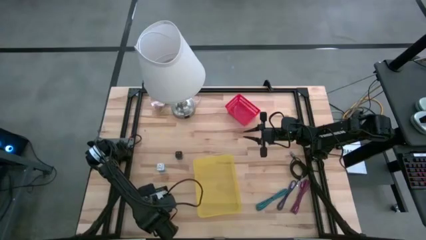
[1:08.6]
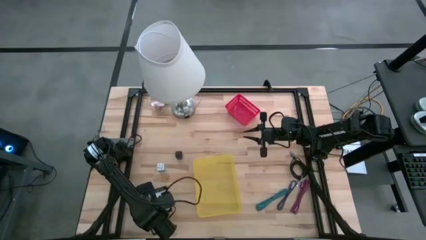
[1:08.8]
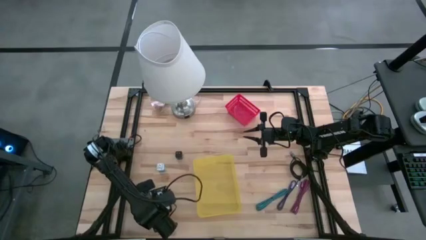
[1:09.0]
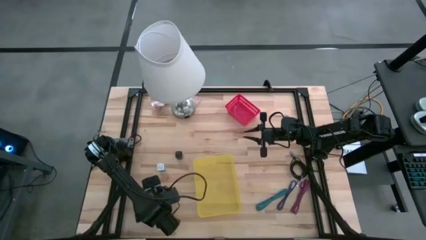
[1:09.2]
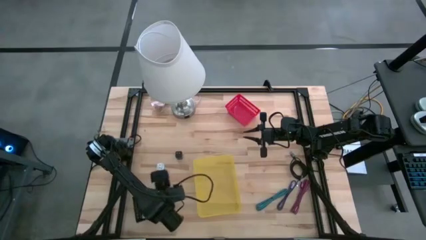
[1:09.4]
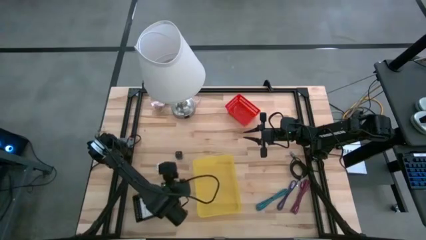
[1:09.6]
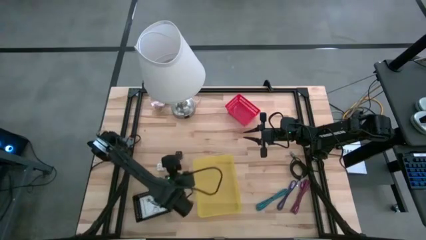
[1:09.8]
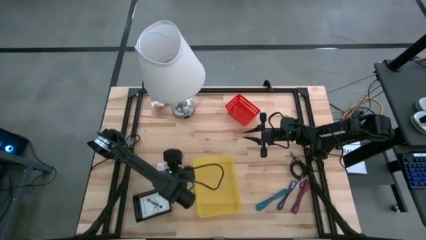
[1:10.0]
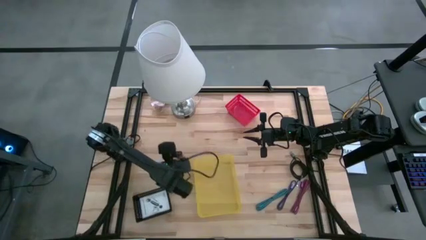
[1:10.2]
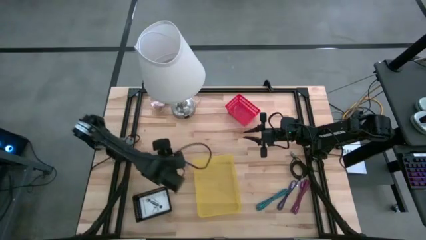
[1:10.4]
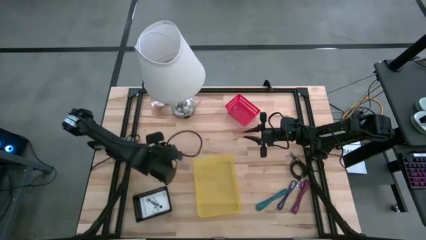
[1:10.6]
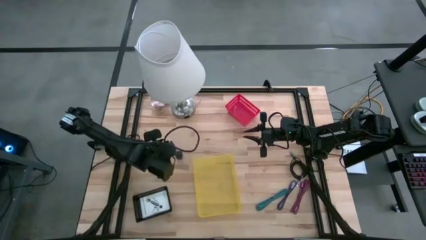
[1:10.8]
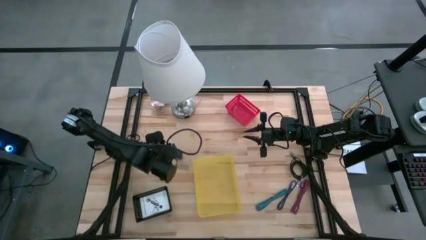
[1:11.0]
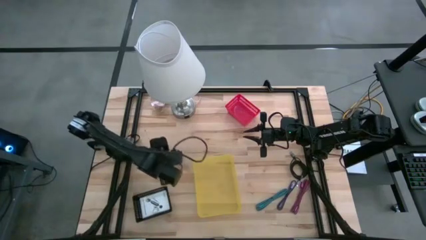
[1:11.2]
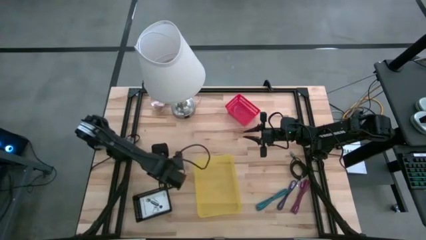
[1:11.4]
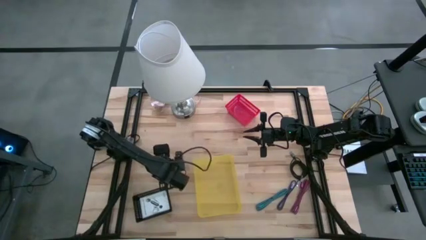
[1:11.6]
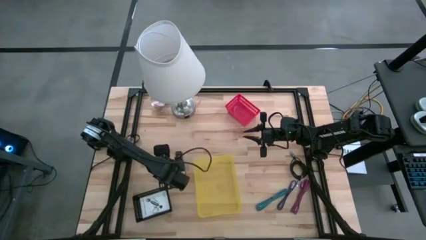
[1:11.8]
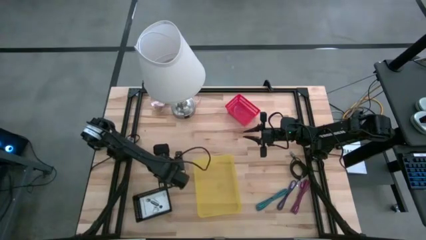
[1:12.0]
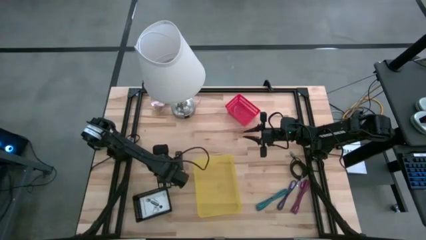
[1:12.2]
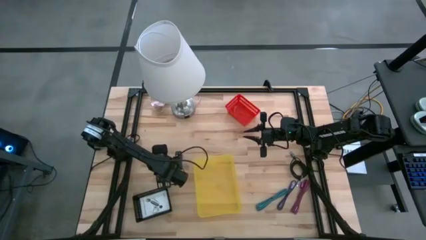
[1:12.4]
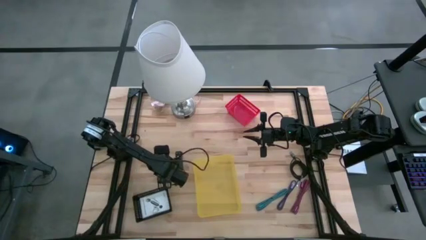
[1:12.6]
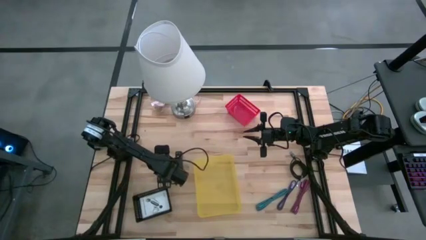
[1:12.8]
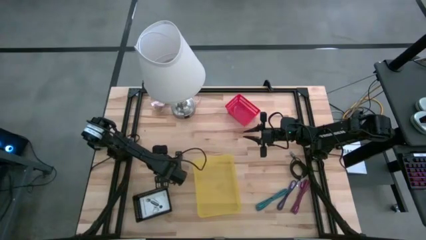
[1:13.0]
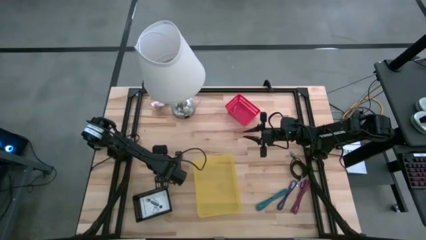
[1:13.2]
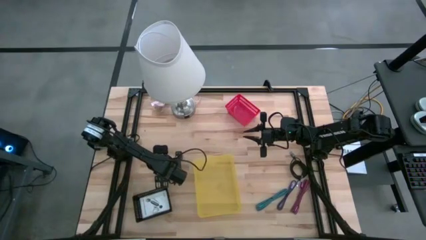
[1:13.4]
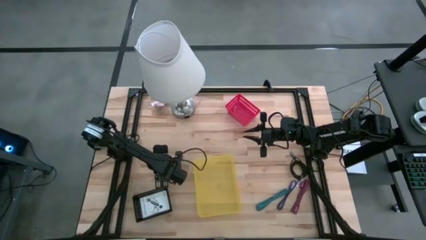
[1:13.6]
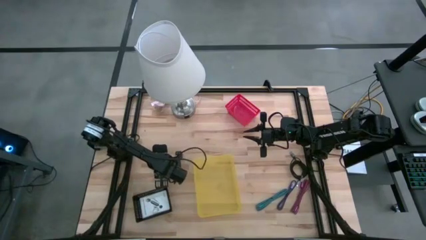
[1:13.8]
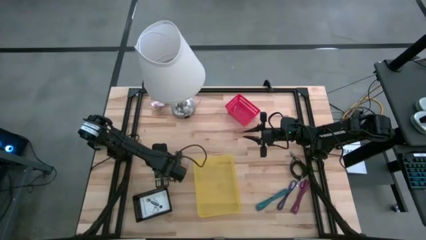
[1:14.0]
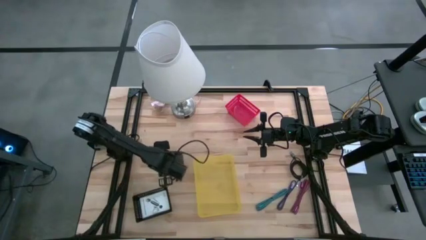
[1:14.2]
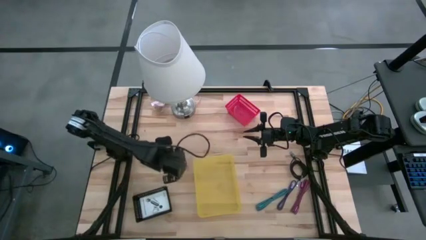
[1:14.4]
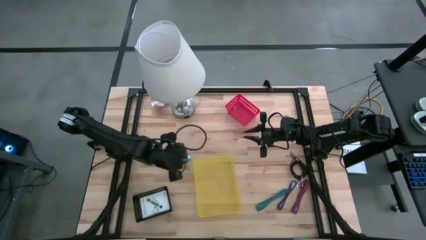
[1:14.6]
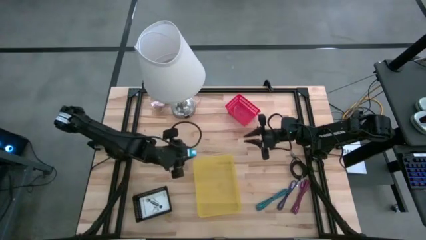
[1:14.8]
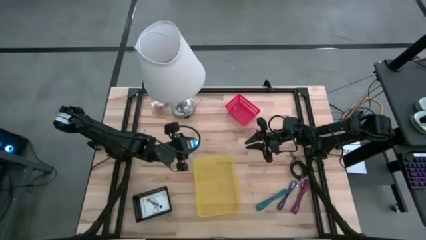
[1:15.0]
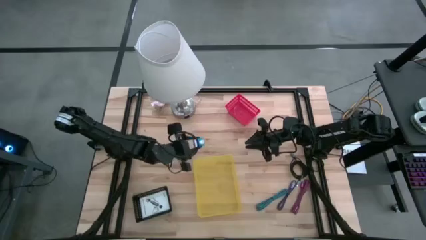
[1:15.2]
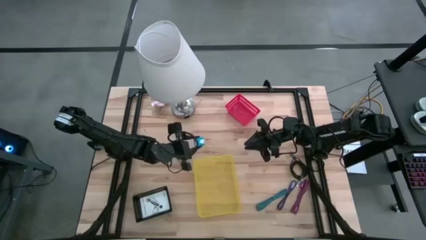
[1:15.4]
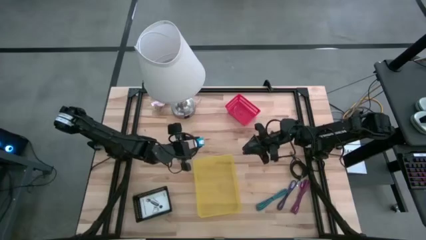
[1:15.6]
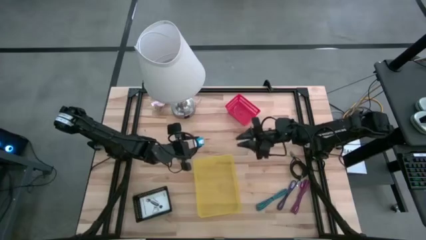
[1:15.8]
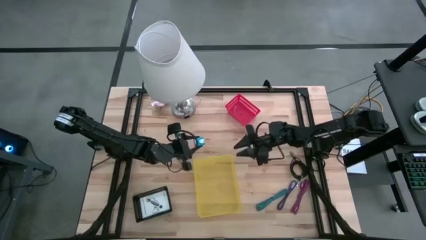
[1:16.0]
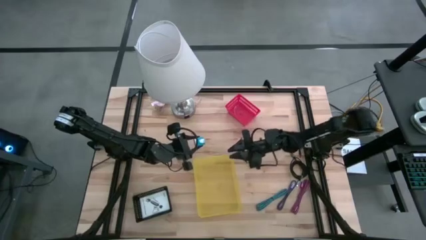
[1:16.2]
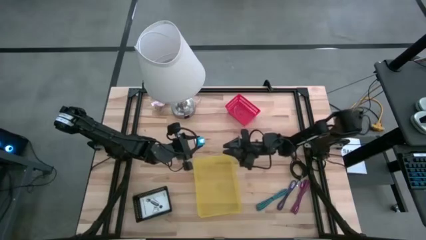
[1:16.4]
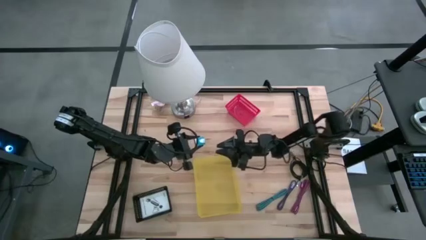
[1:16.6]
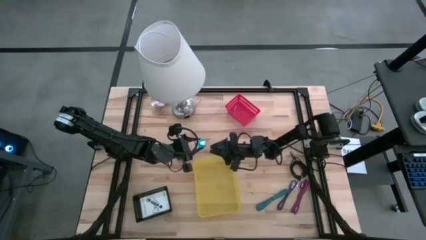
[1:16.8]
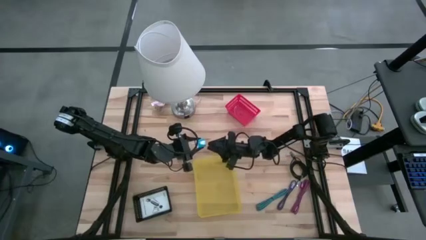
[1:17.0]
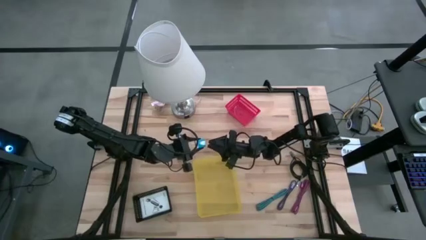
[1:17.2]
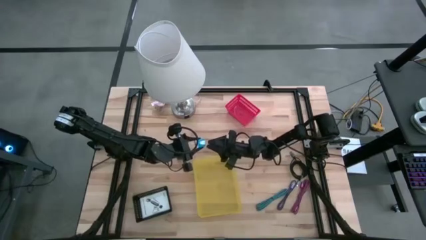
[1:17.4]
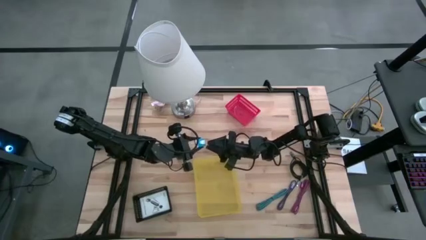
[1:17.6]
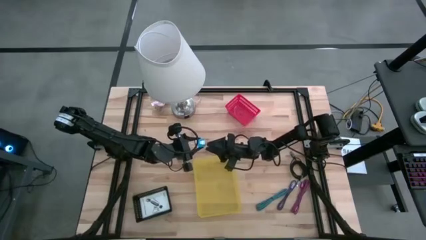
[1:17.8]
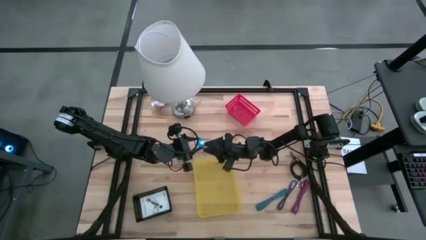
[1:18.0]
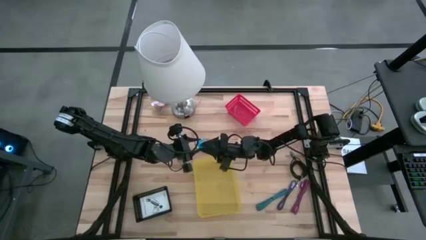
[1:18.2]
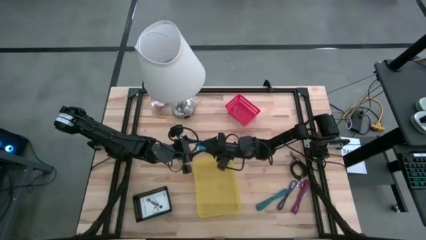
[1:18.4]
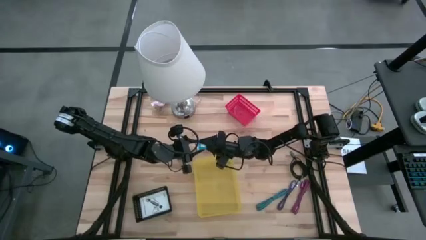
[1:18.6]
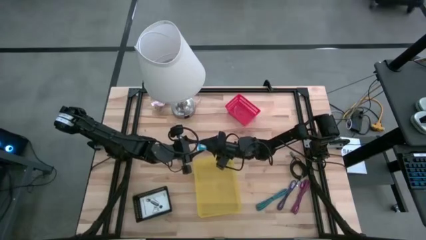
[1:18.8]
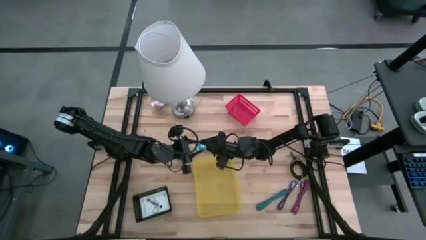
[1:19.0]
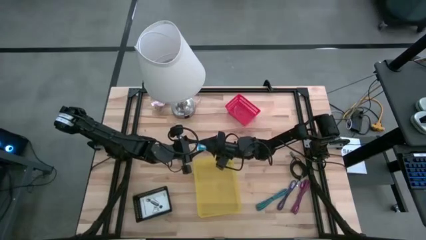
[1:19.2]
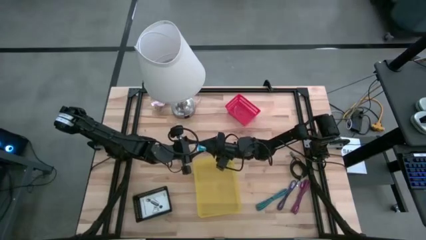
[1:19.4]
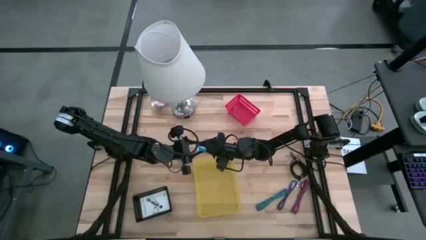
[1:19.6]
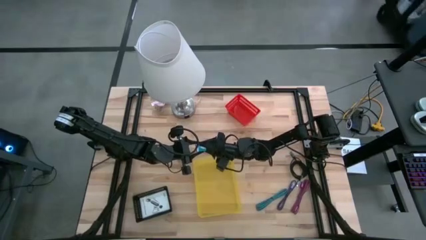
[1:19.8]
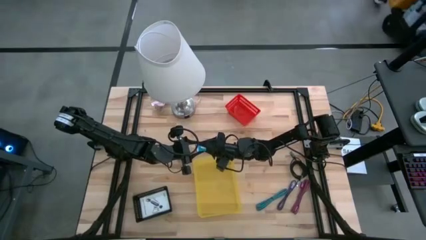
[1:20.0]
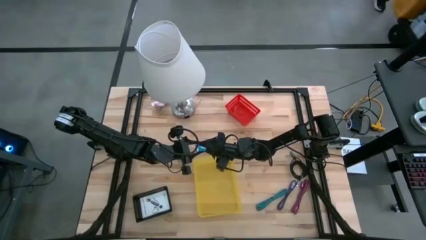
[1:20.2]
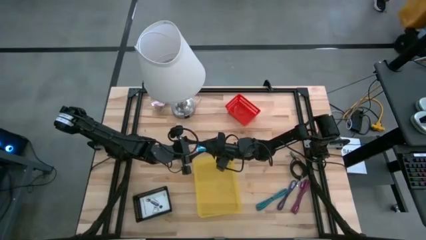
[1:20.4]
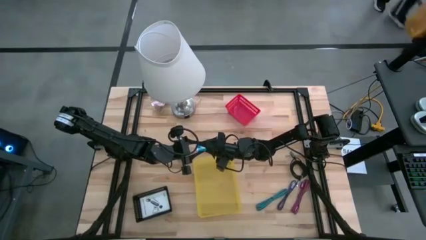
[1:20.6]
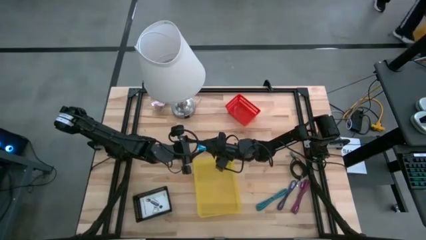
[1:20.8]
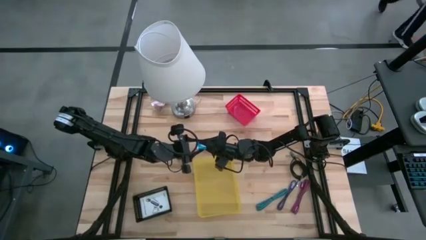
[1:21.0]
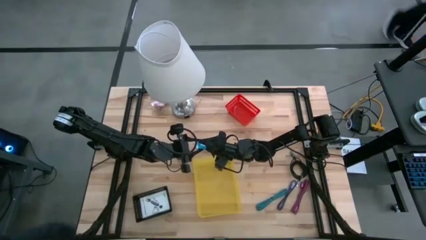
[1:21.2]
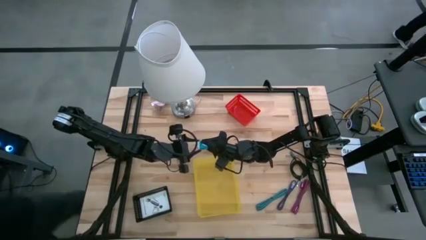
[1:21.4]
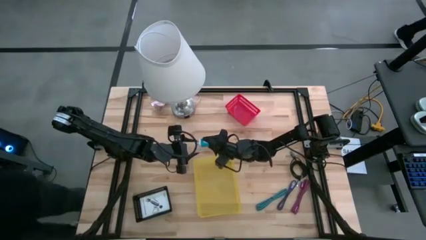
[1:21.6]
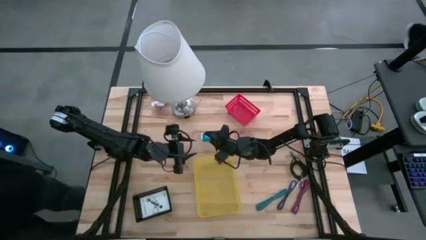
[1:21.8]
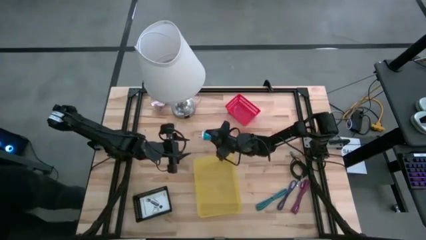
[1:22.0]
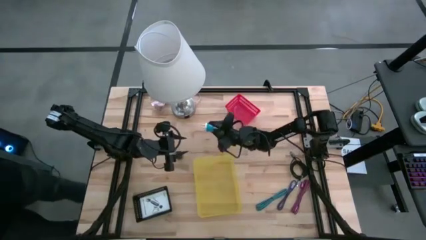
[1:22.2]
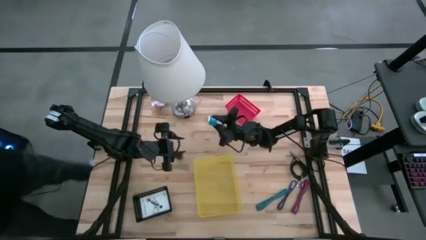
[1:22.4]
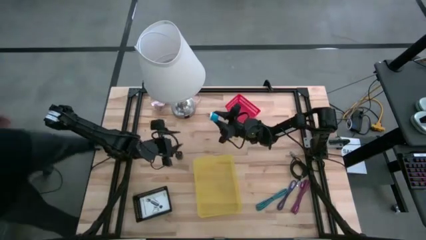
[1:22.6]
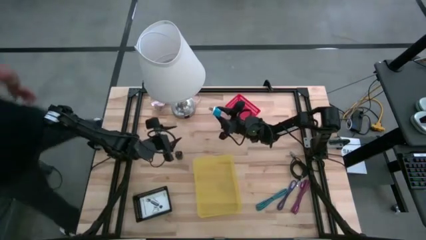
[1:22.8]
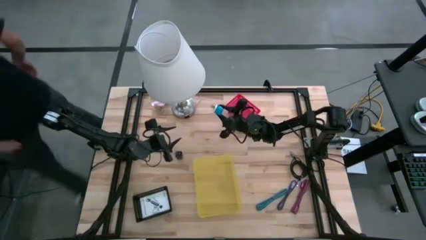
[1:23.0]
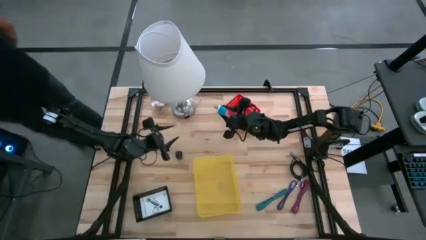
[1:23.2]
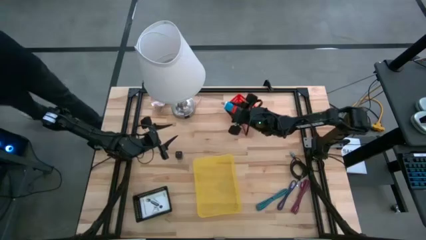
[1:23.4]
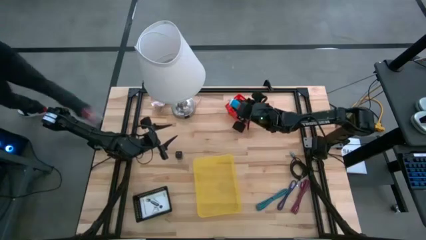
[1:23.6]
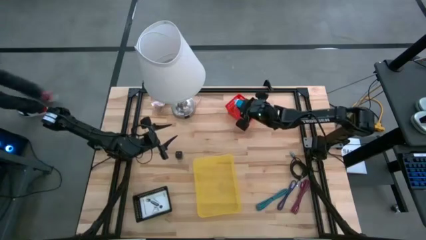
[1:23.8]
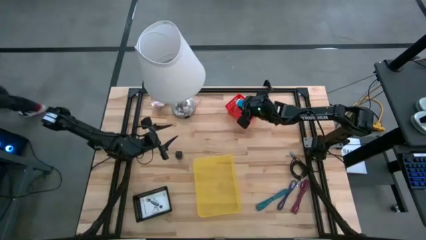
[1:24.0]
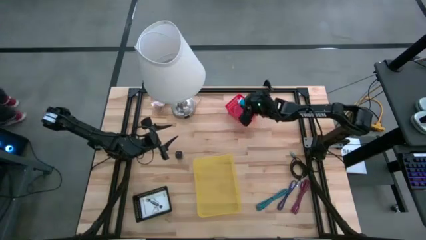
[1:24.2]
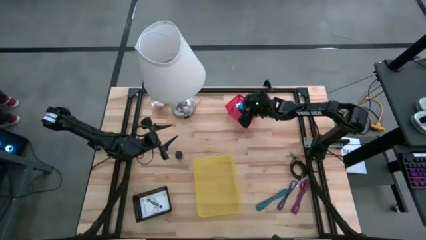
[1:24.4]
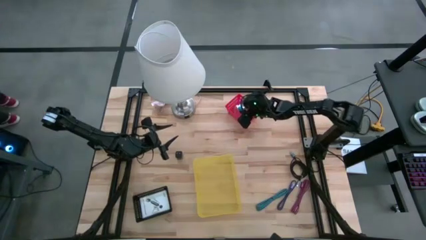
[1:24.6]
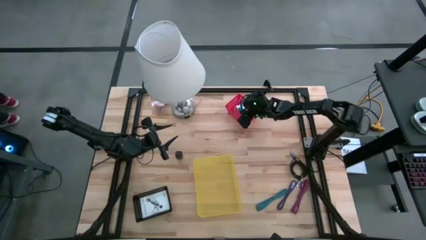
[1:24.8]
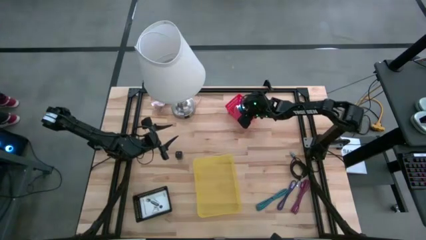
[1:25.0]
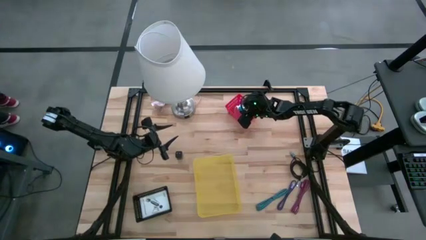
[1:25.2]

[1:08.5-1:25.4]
Task: Pick and place items into bin
Put the blue charger adapter into the red bin
